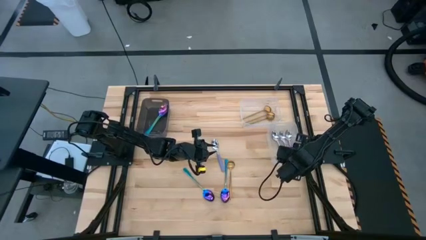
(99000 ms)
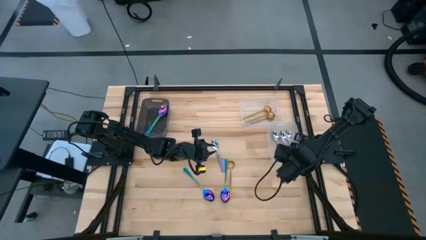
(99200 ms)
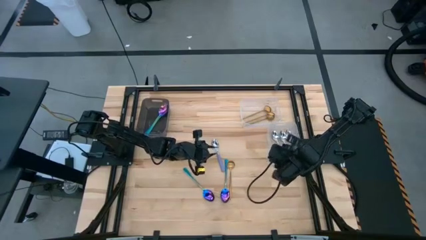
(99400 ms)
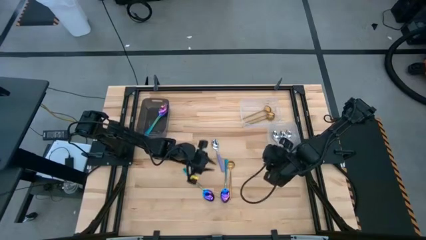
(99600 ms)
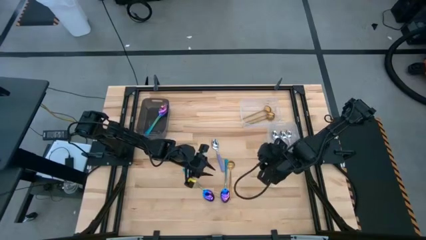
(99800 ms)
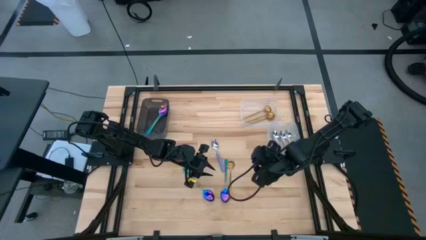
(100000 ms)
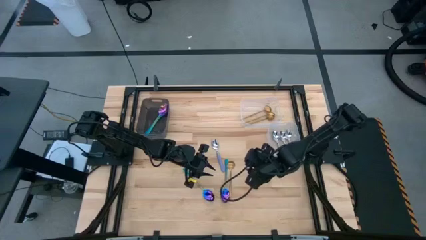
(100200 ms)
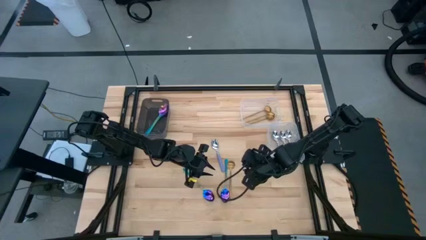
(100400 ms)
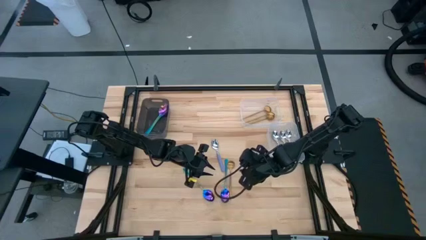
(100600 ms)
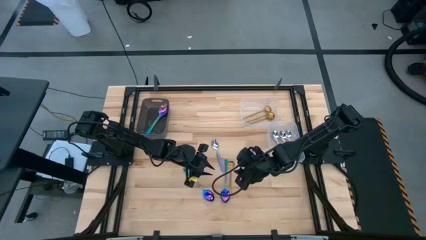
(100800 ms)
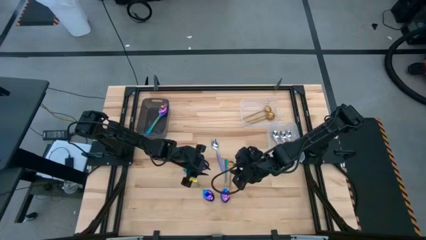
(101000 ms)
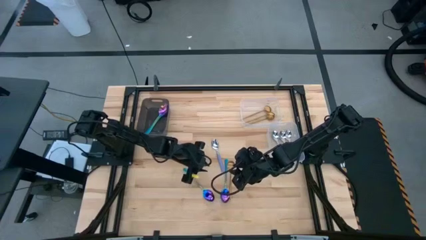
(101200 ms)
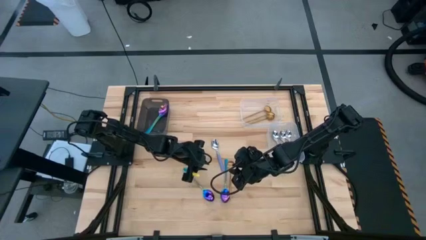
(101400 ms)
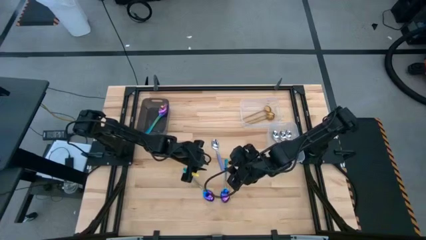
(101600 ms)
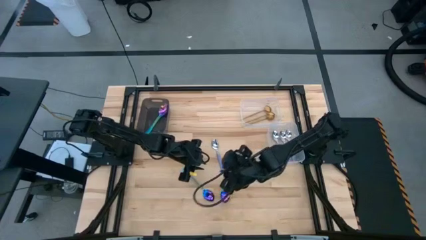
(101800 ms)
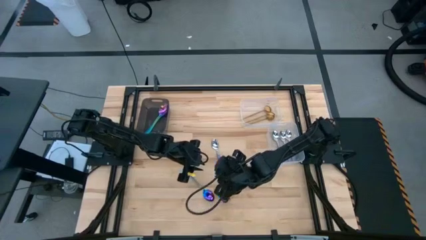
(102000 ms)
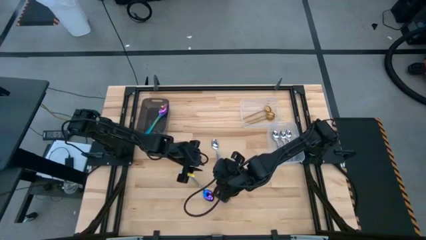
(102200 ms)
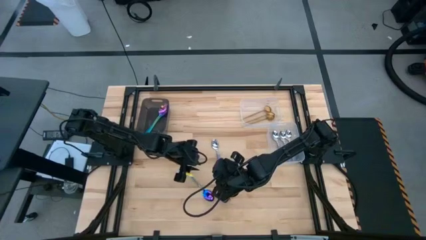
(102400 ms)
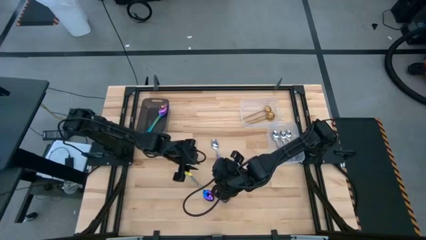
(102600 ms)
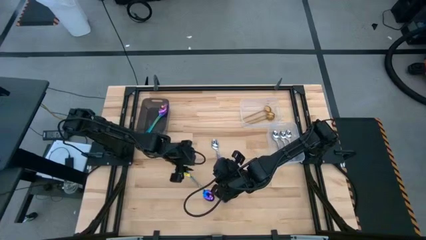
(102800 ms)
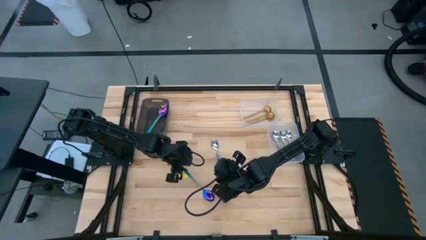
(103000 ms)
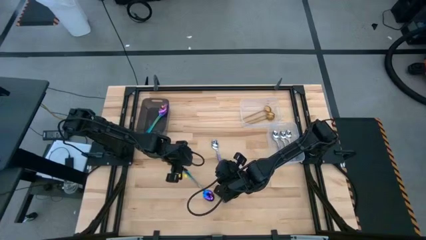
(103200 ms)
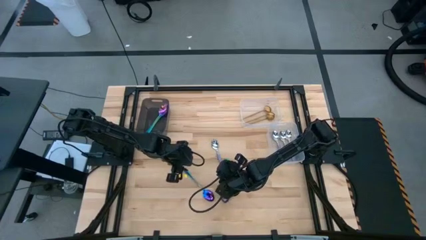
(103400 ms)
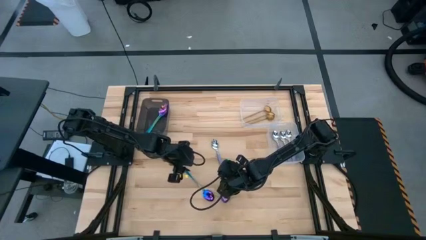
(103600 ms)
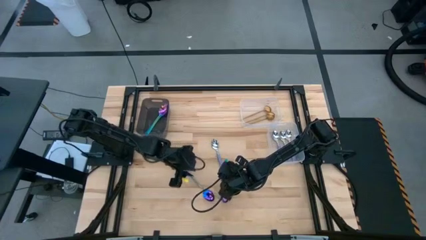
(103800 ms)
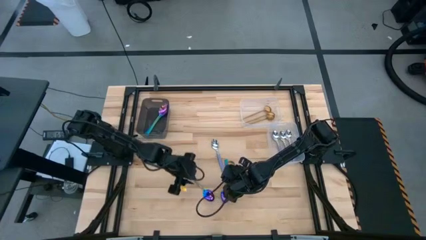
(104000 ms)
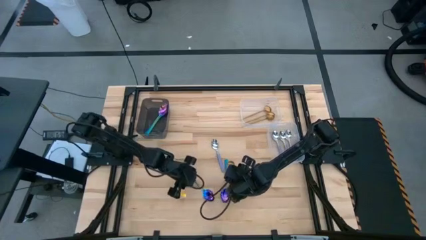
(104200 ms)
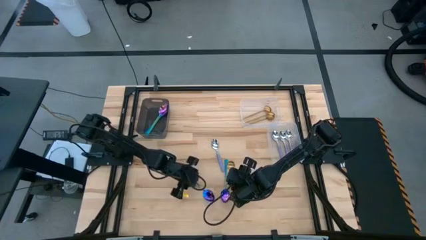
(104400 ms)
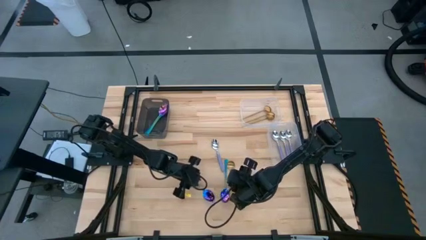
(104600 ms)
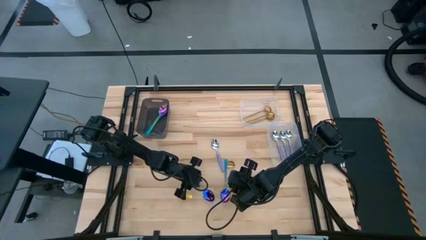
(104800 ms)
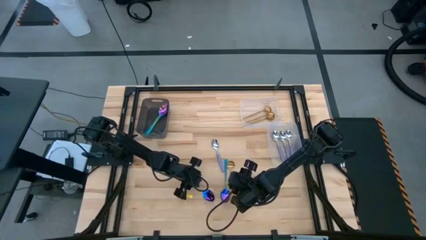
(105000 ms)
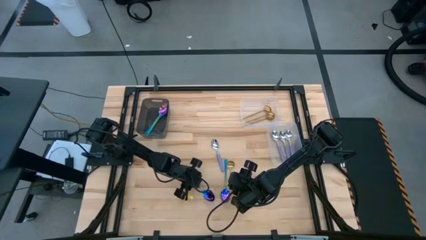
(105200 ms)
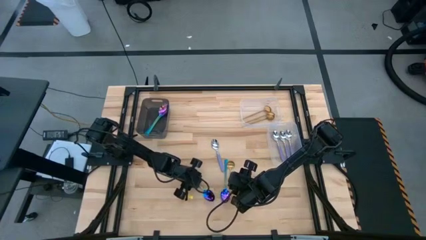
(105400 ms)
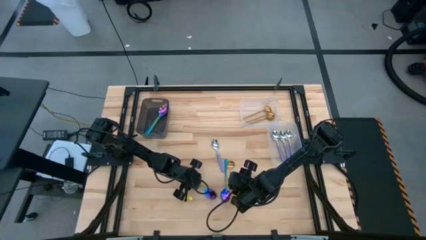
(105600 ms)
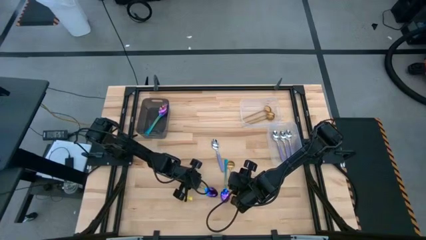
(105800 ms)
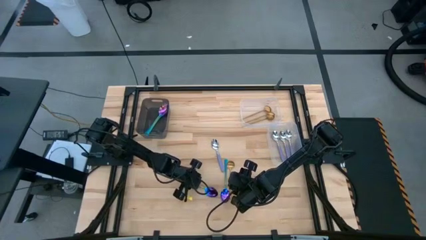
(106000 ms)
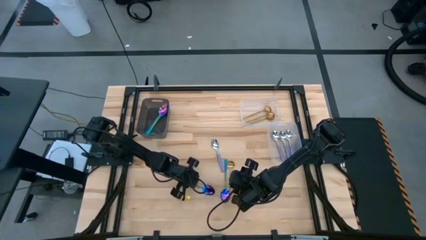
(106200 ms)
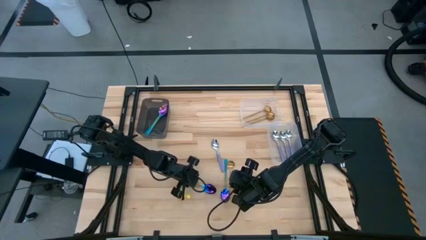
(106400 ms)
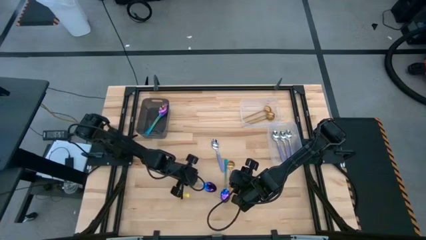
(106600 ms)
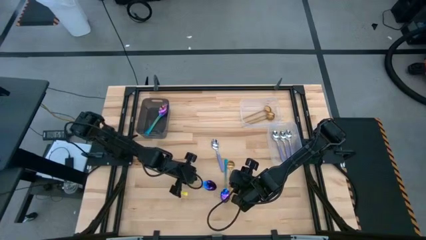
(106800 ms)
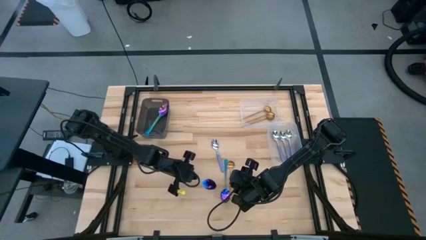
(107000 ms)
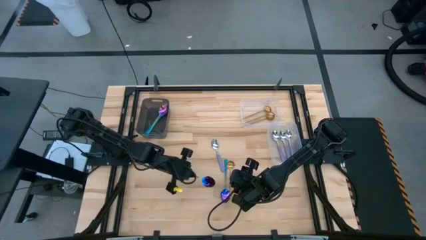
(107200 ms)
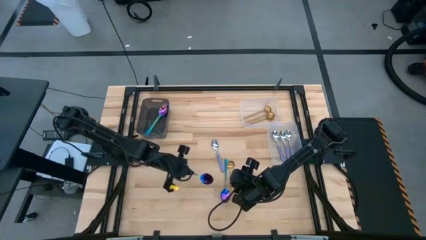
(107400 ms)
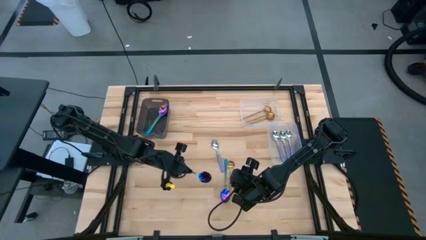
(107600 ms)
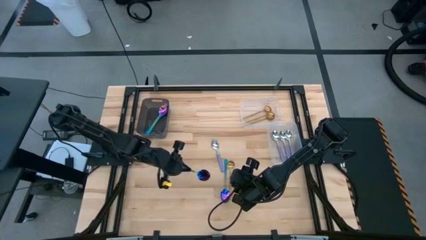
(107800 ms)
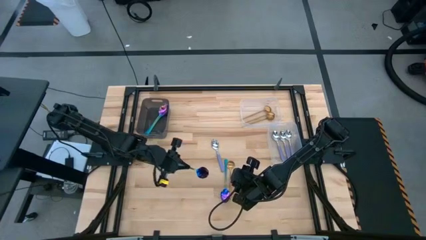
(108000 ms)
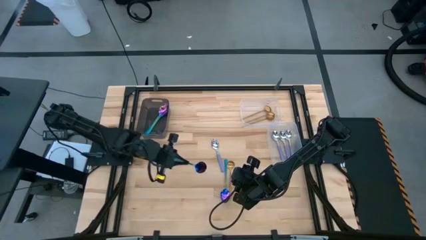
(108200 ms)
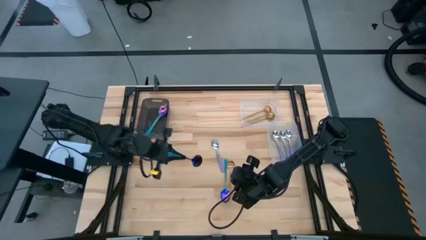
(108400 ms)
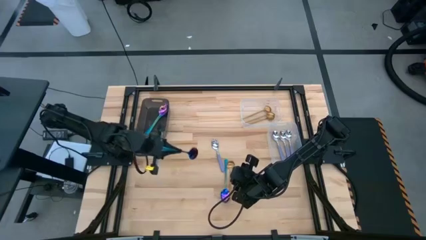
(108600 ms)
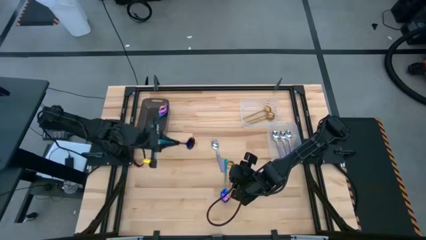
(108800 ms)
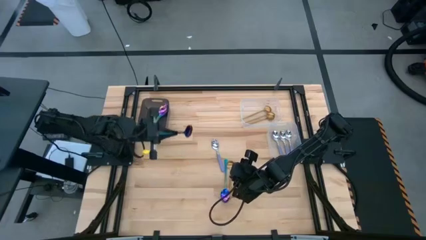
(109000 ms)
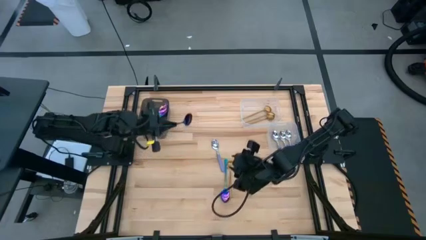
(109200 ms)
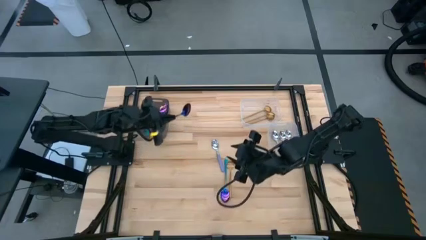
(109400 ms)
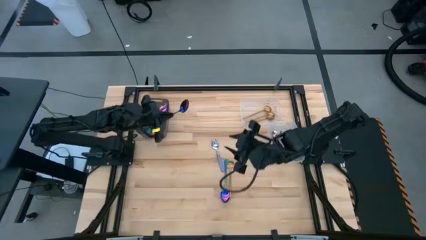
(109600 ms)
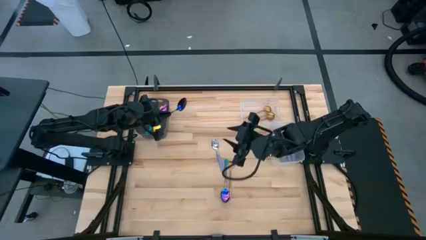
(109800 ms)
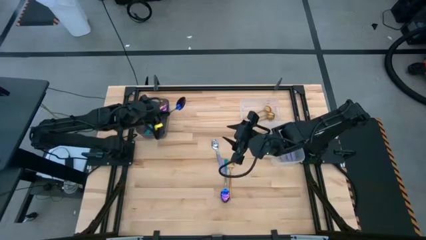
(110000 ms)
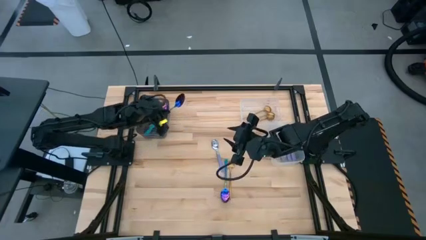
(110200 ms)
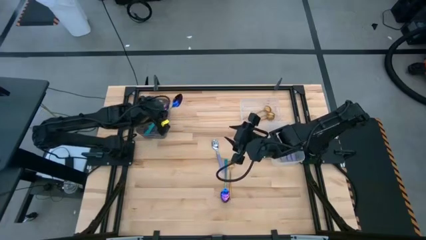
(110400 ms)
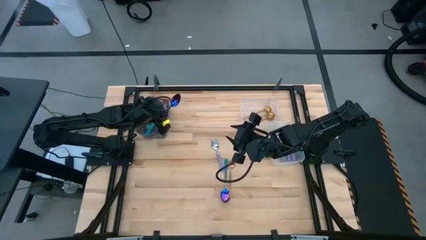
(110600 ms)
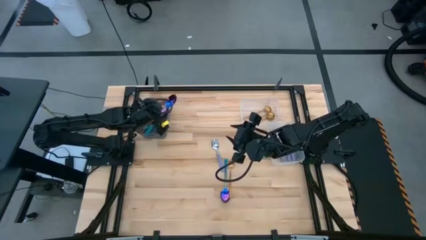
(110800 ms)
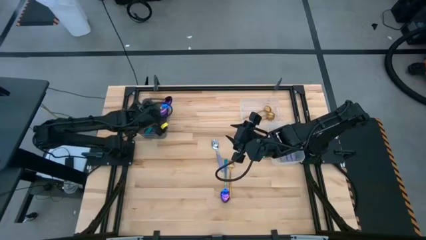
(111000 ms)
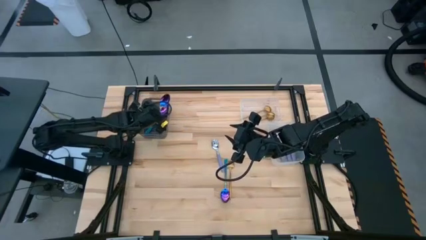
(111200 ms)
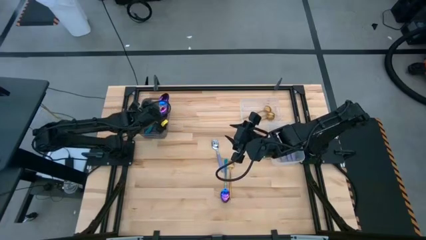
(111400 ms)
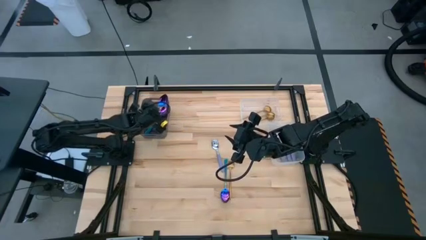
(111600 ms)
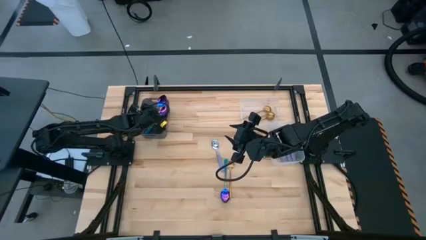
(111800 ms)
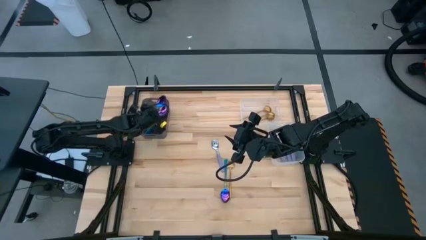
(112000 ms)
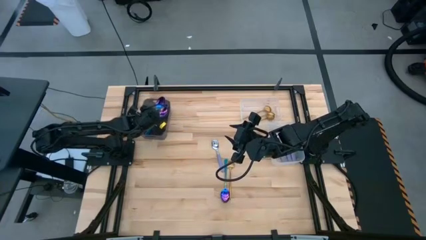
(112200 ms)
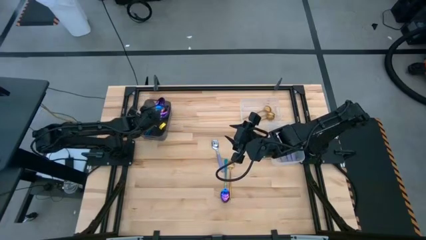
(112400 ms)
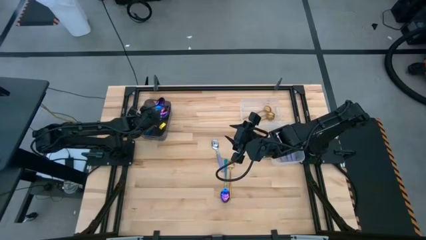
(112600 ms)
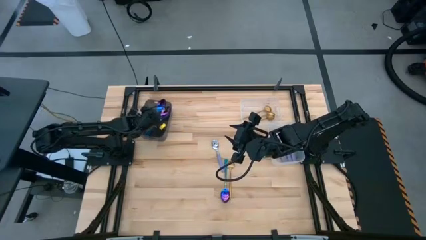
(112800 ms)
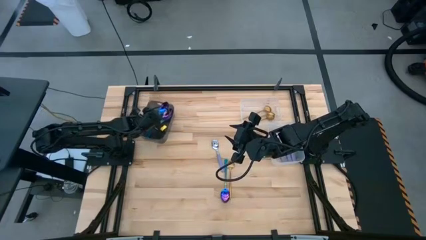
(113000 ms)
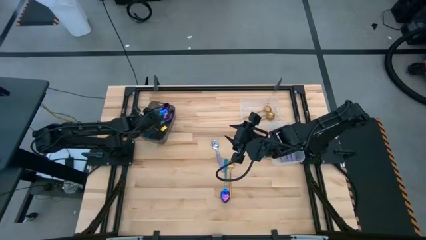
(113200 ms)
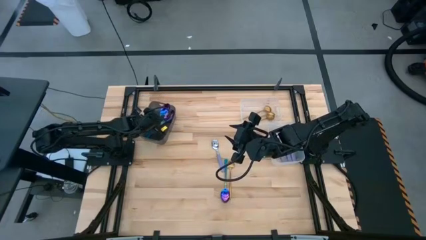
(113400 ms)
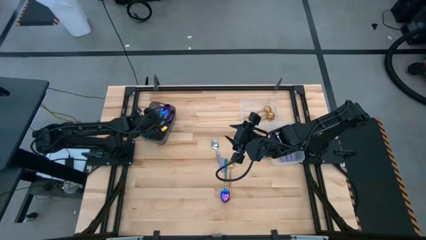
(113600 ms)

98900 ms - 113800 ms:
Task: Sort silverware by color (type)
Put the blue spoon into the black bin

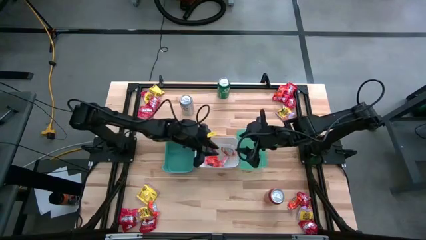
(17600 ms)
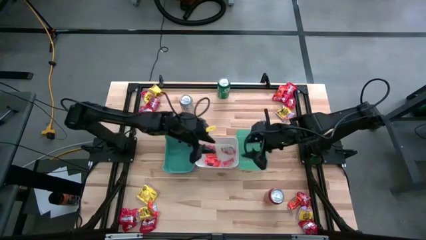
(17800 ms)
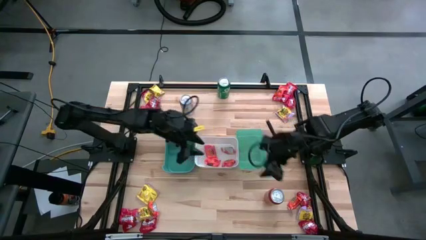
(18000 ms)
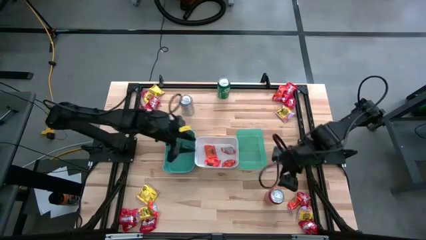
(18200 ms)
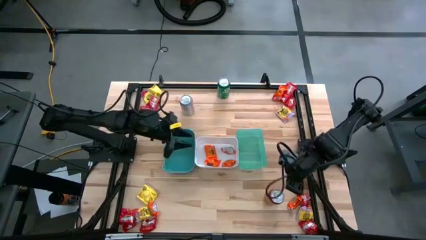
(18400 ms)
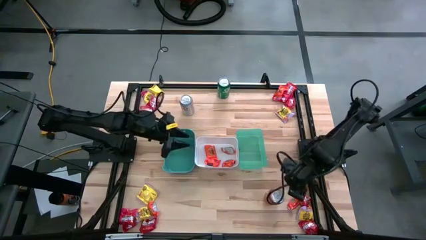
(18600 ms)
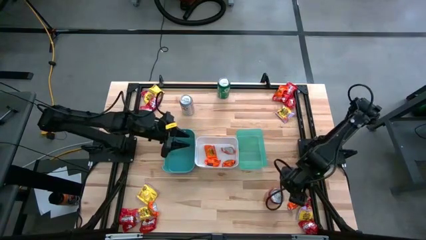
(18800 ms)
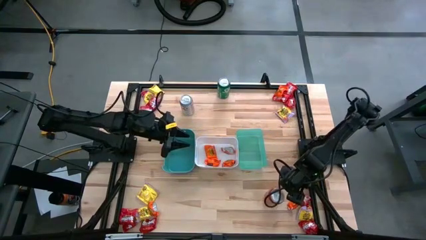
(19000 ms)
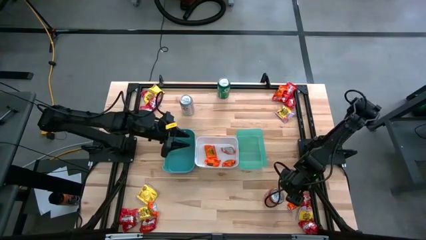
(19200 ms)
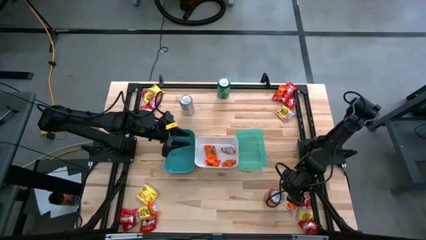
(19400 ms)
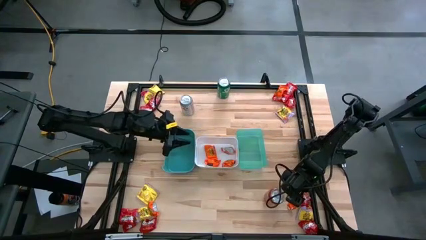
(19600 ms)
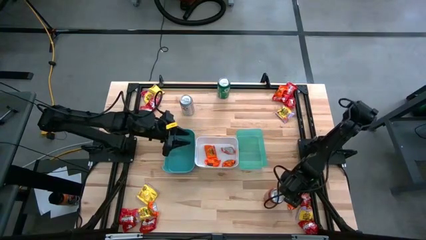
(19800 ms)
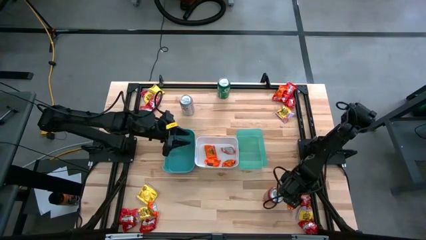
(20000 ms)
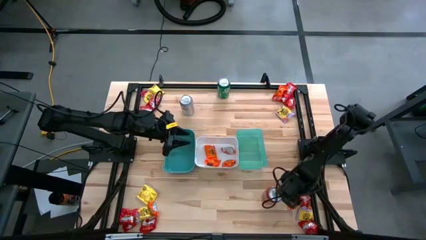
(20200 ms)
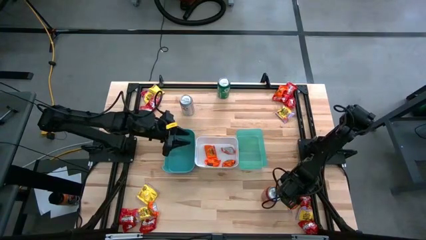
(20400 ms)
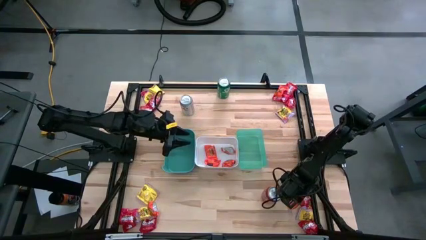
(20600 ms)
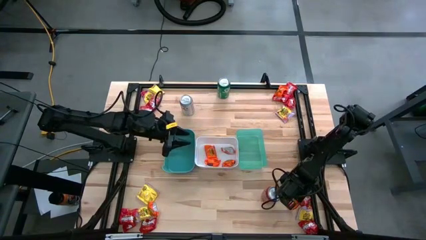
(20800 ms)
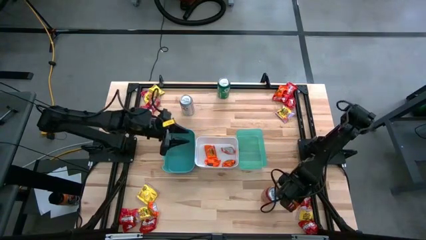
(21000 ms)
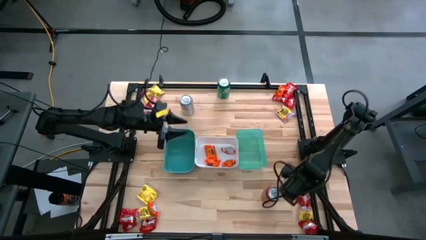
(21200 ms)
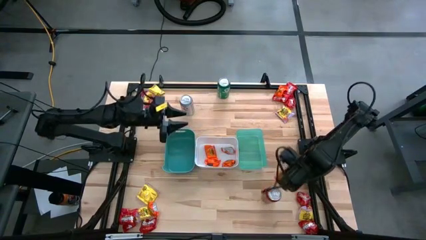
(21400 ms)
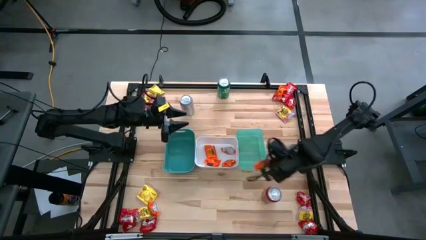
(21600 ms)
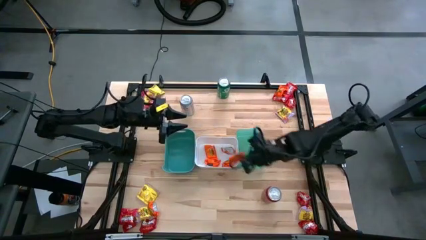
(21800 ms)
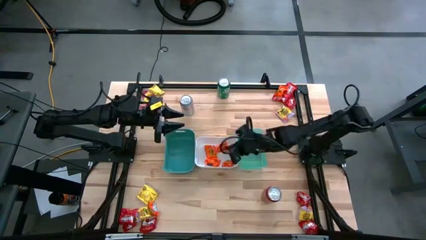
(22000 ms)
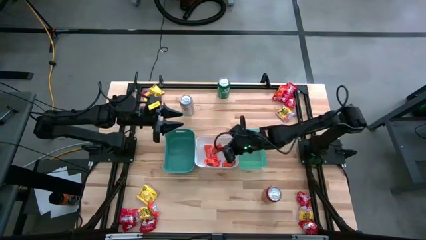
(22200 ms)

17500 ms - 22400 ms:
Task: Sort candy
Put the orange chocolate into the white bin
